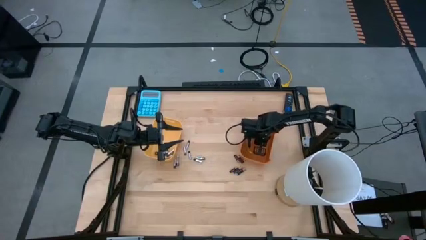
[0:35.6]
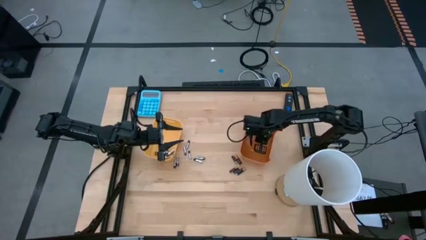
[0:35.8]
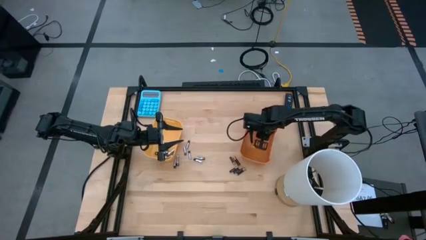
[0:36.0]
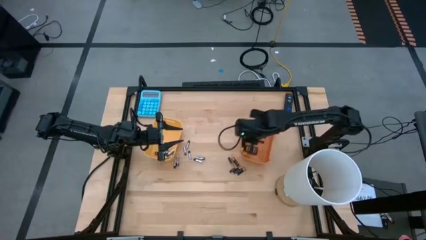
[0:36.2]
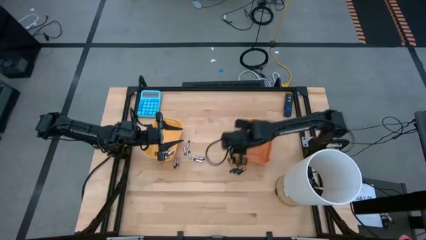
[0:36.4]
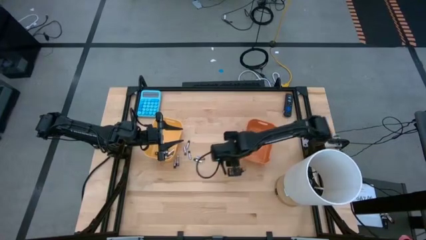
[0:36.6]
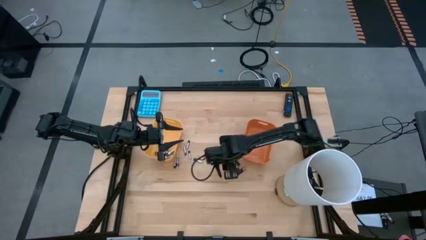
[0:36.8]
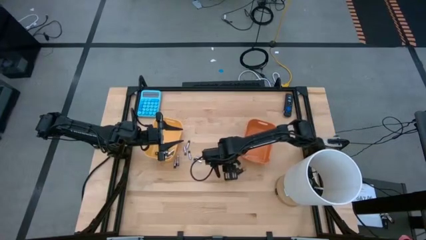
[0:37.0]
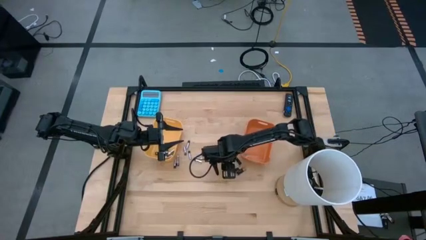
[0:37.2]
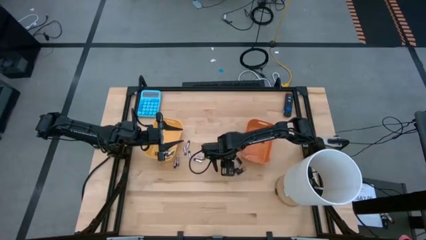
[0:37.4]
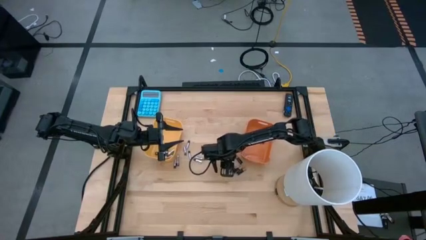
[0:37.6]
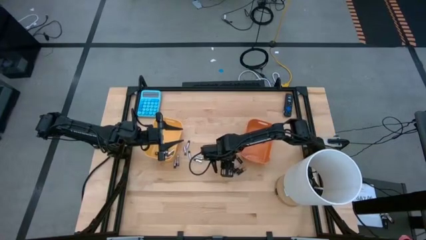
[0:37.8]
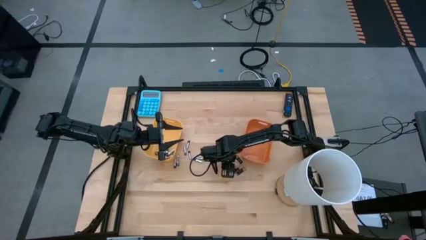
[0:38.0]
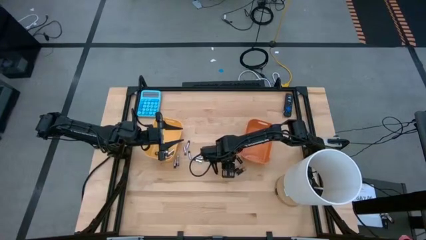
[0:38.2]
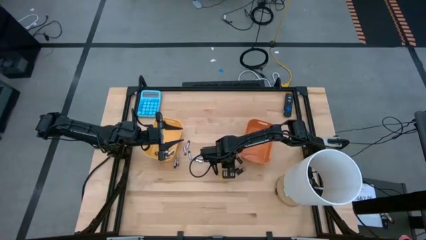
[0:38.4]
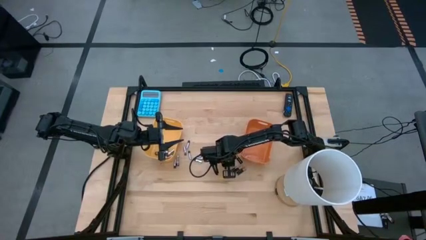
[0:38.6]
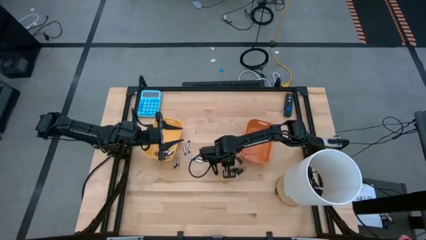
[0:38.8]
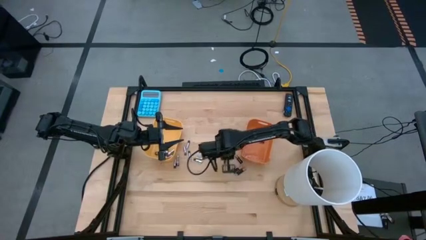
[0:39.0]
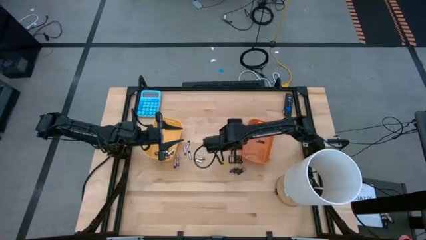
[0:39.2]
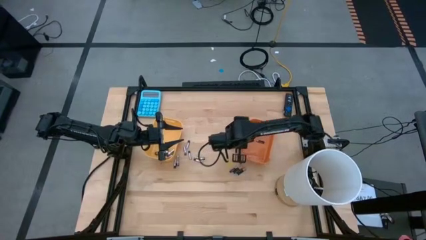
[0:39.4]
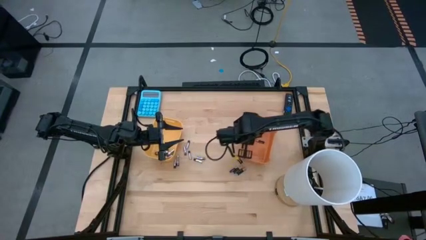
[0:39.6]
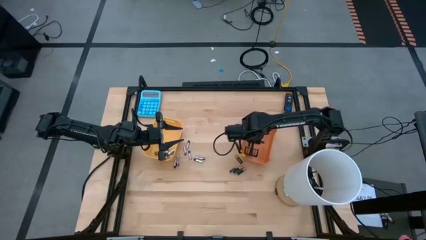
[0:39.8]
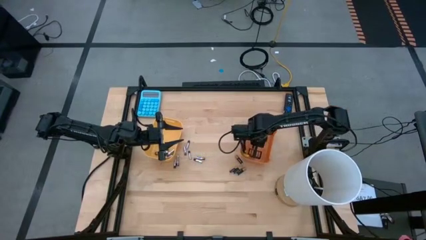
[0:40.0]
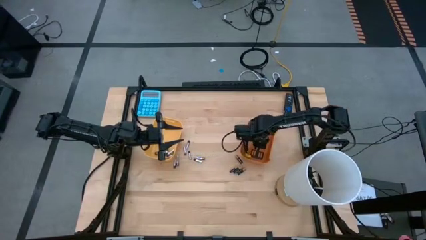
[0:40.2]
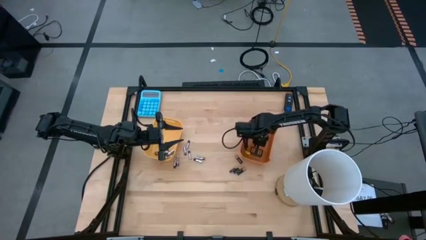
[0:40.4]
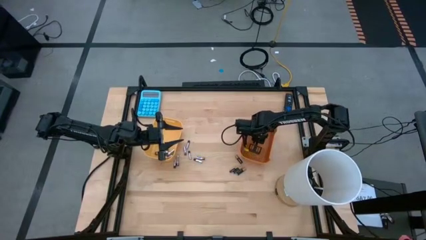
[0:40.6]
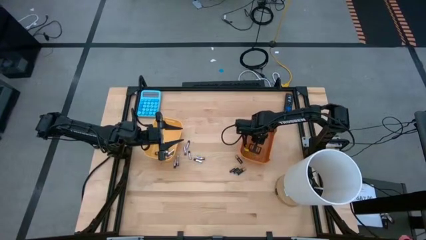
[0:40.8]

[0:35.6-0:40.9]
Task: Sort batteries
Put the black battery into the orange bin

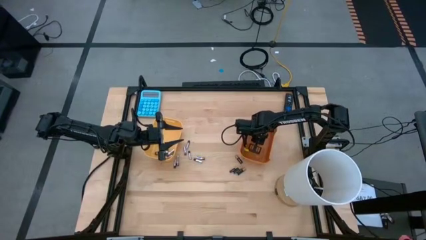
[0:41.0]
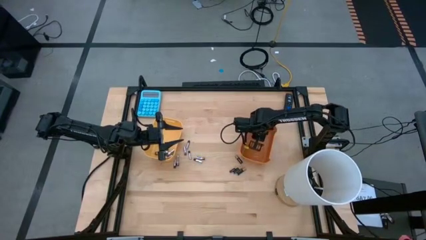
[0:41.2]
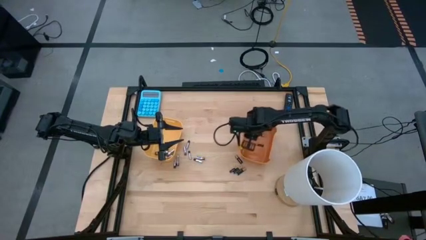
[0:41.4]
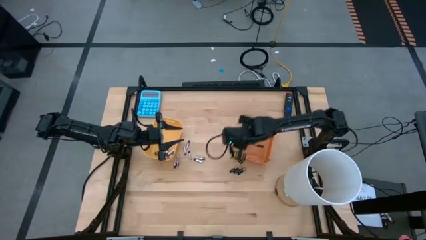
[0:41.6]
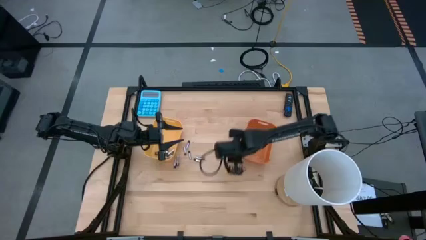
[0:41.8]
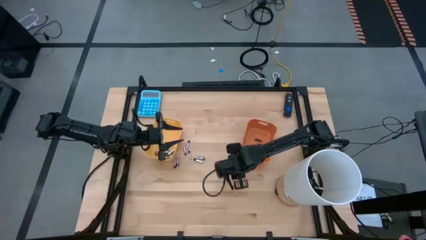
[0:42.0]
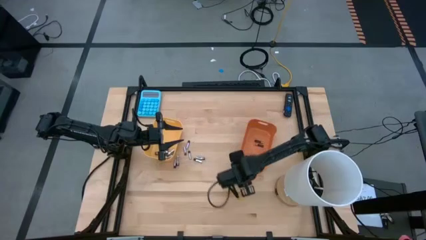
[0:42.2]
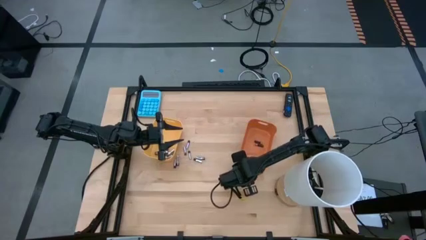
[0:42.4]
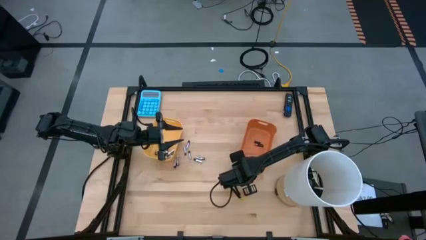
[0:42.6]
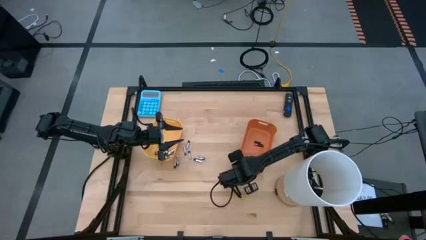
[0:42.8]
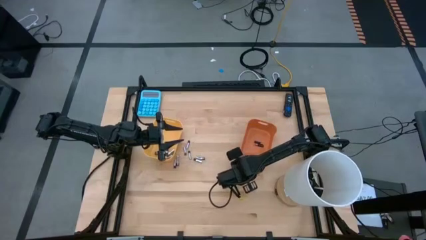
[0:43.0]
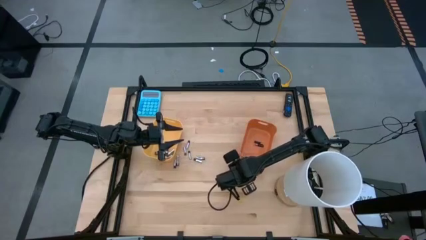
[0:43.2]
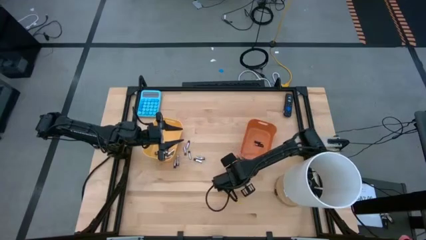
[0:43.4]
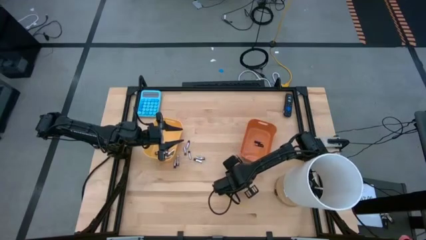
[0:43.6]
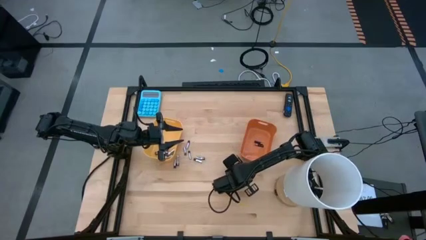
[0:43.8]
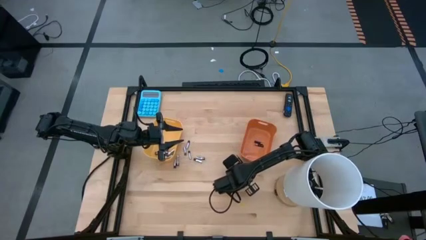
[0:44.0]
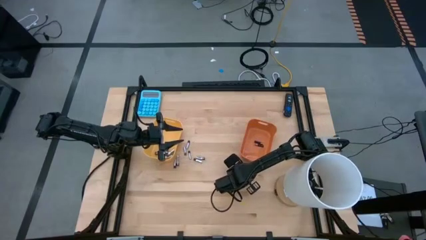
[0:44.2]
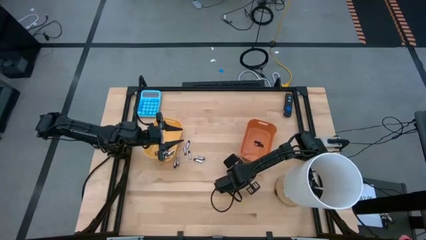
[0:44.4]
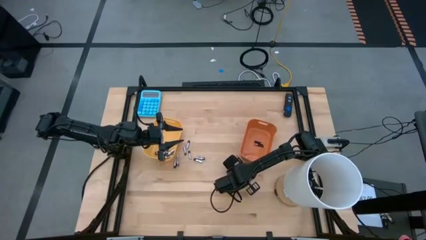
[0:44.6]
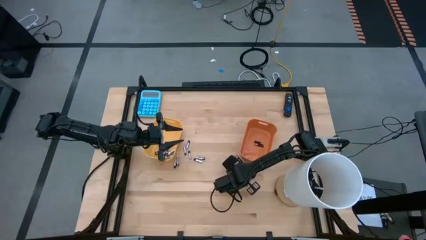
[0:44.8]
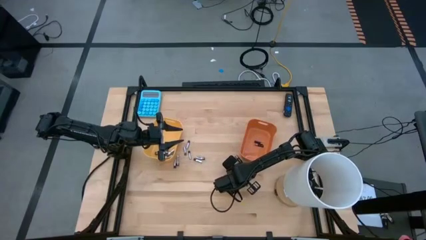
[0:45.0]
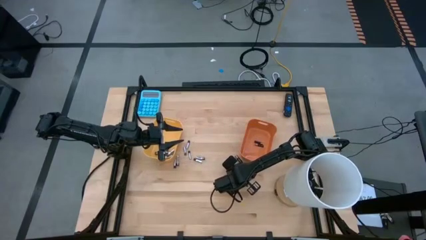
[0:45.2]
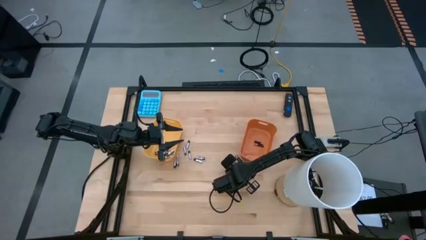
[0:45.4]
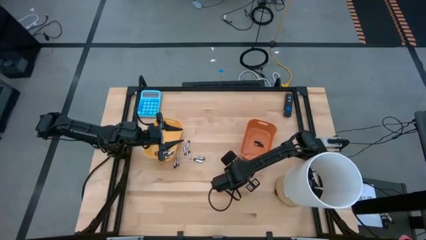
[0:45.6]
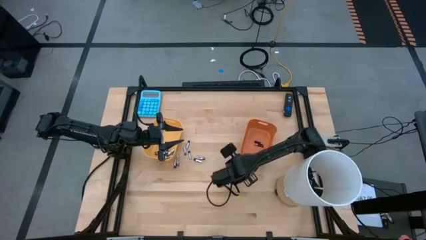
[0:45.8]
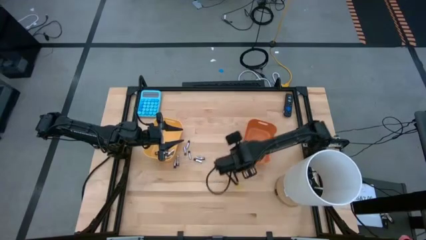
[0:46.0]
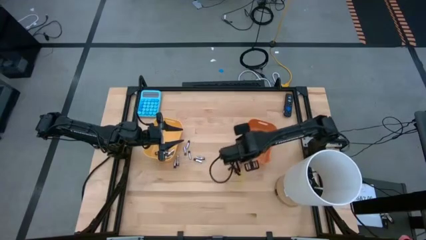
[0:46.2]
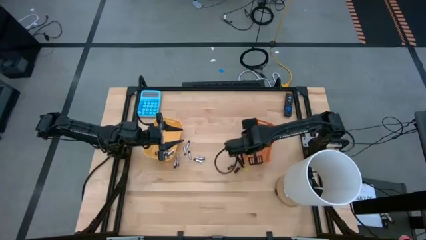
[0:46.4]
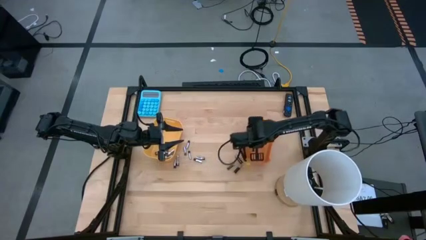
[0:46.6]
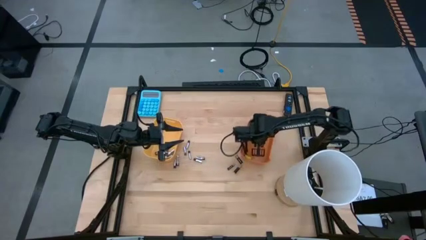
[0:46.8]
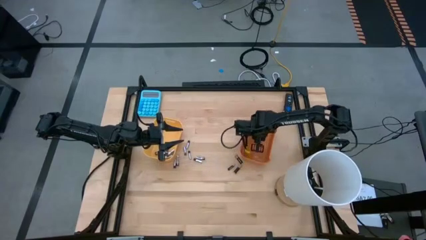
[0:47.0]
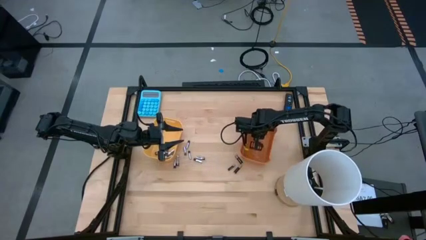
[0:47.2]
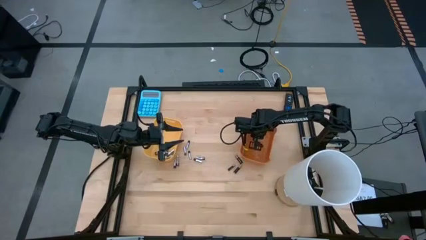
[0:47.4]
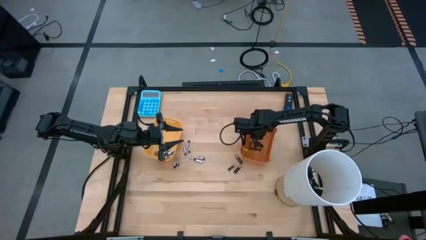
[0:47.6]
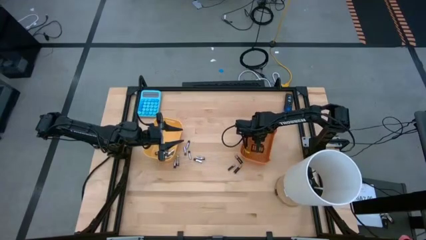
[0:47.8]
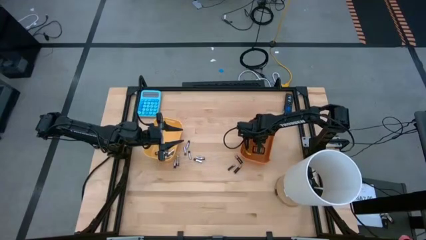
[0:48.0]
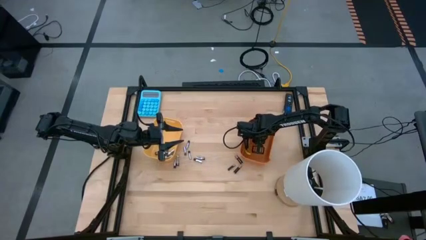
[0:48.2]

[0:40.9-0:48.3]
Put the black battery into the orange bin

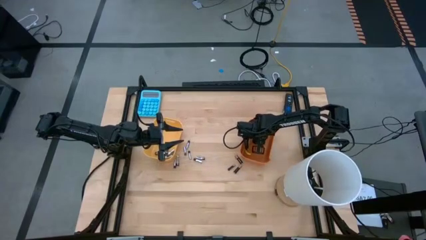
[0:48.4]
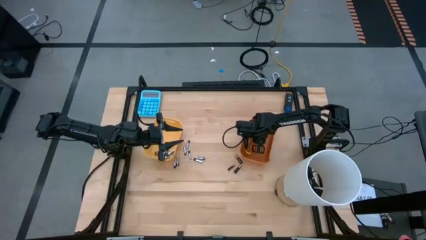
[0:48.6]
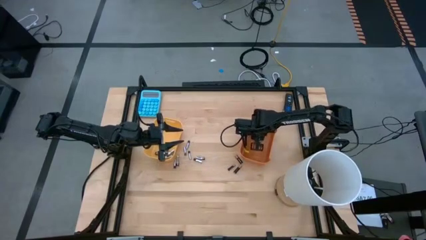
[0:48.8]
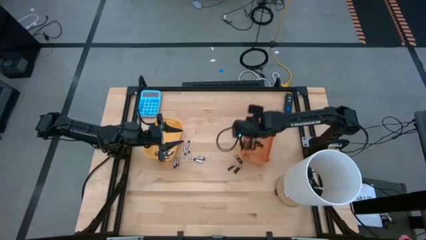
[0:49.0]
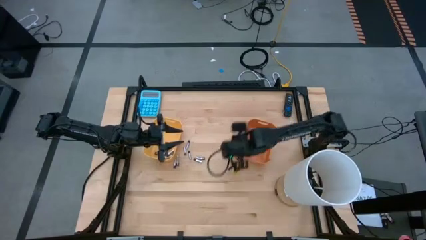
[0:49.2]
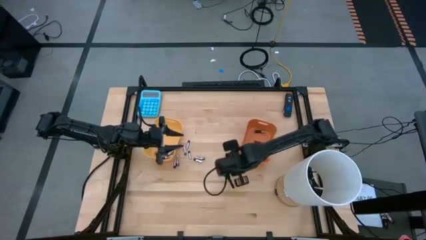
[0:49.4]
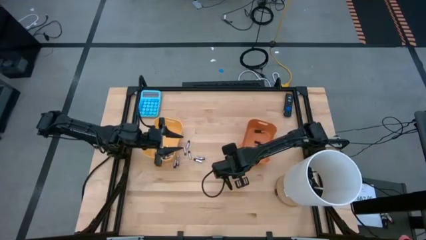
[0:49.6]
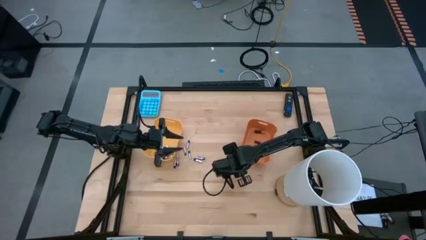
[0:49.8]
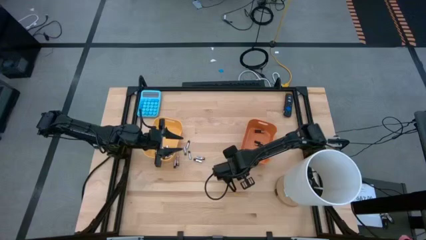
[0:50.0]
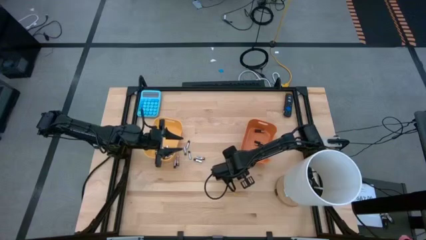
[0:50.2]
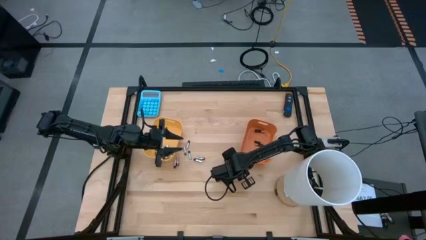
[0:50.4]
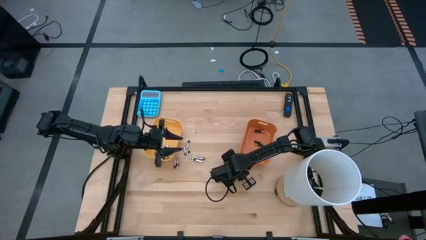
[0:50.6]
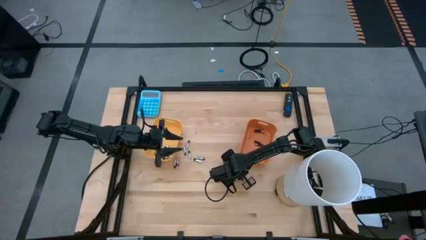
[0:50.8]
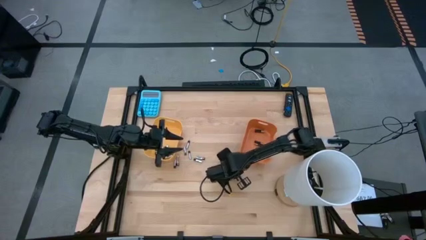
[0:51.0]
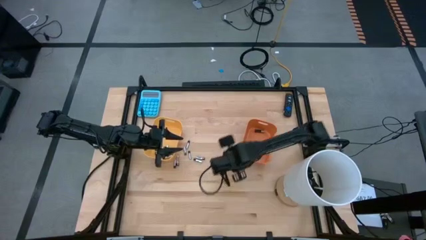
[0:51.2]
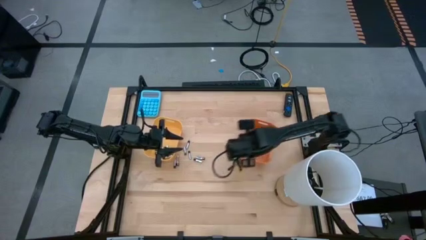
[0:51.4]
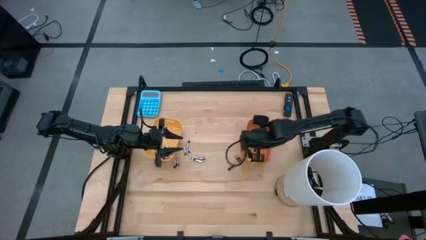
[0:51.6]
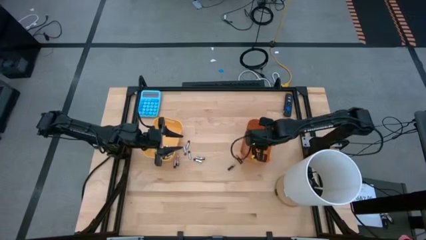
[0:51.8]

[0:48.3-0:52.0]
Put the black battery into the orange bin
